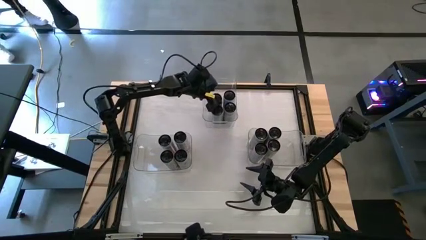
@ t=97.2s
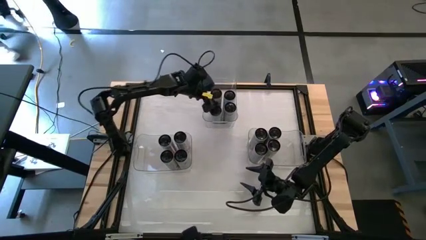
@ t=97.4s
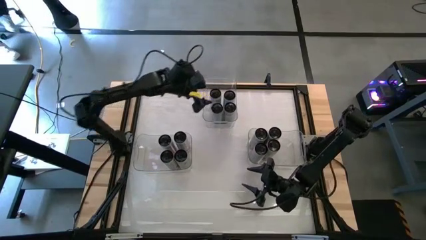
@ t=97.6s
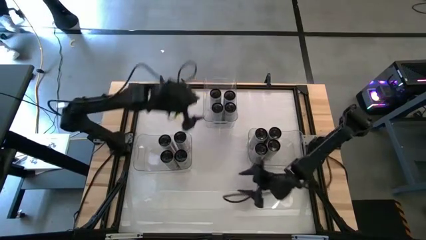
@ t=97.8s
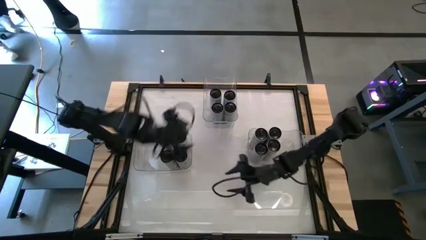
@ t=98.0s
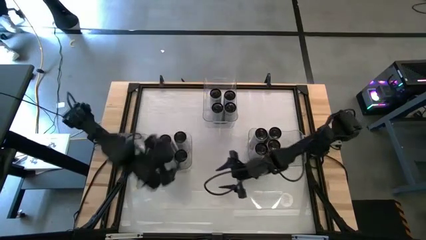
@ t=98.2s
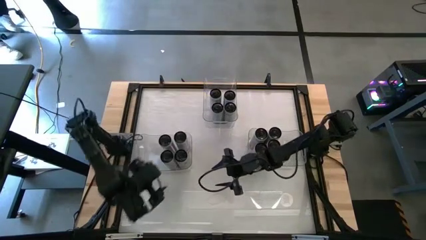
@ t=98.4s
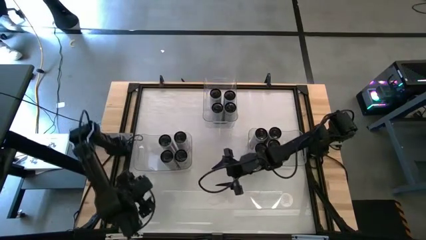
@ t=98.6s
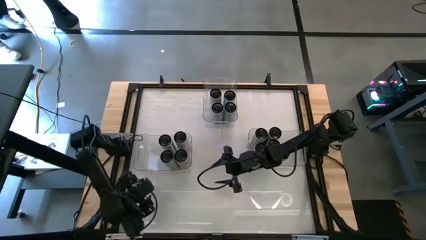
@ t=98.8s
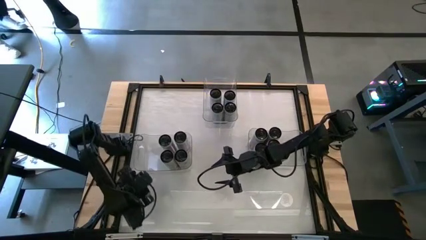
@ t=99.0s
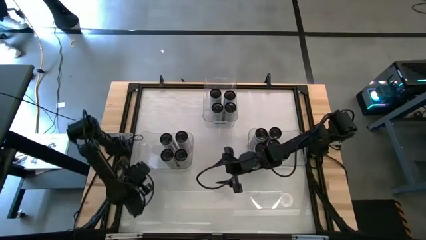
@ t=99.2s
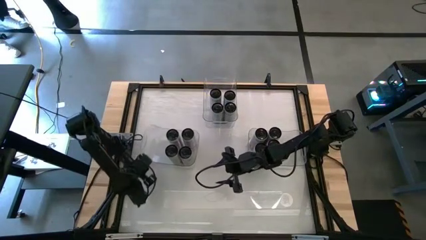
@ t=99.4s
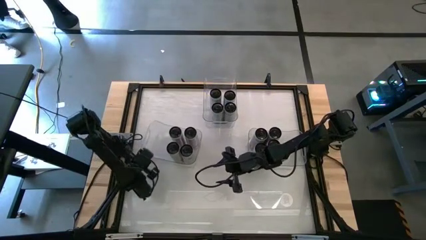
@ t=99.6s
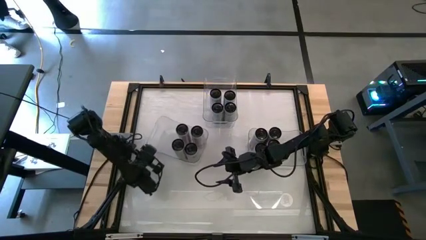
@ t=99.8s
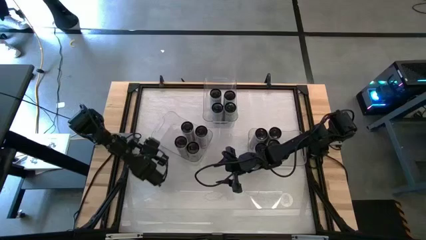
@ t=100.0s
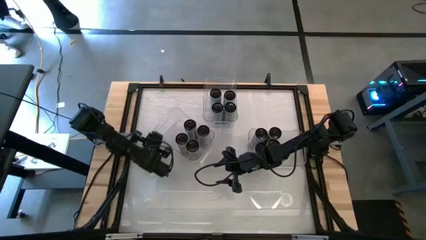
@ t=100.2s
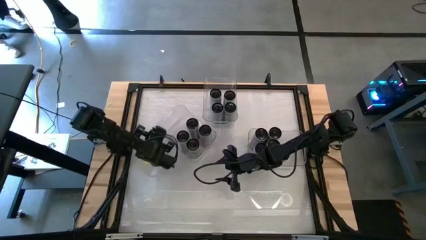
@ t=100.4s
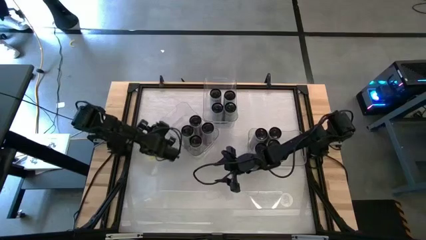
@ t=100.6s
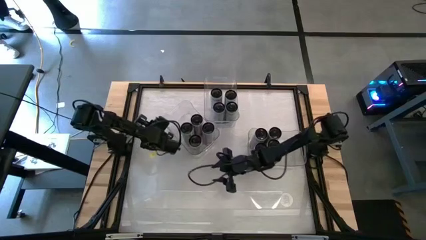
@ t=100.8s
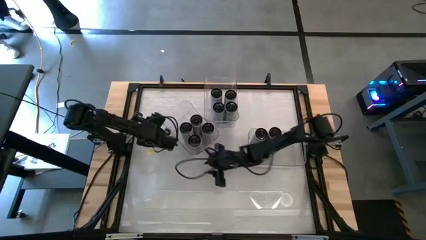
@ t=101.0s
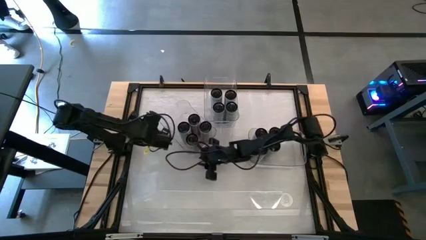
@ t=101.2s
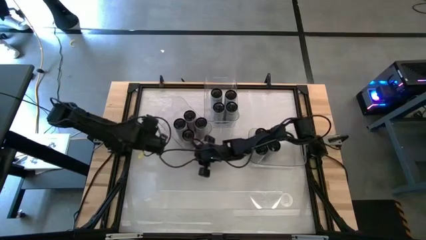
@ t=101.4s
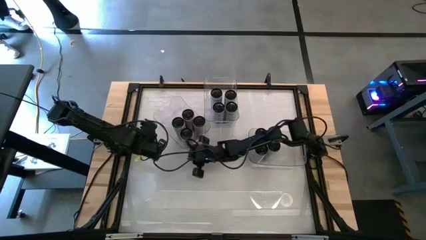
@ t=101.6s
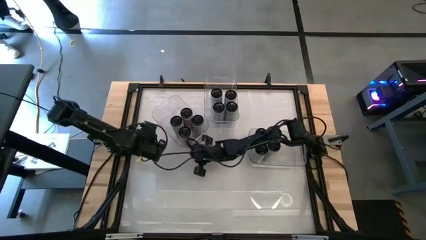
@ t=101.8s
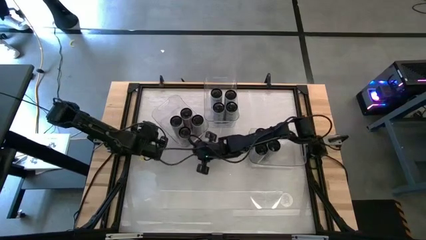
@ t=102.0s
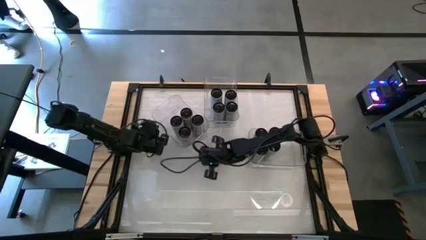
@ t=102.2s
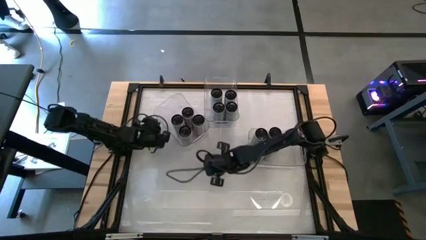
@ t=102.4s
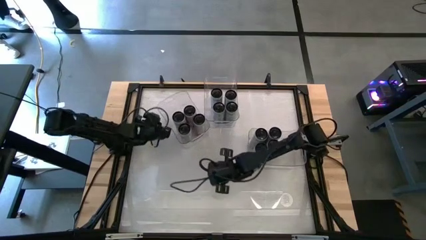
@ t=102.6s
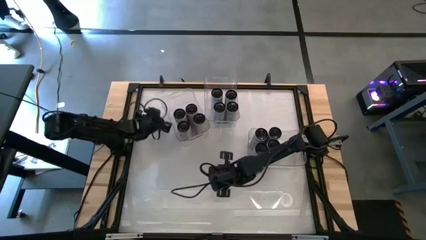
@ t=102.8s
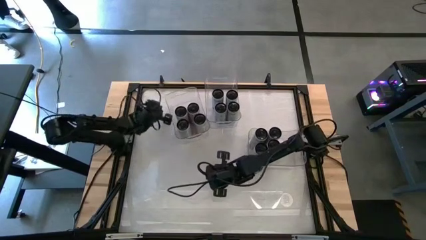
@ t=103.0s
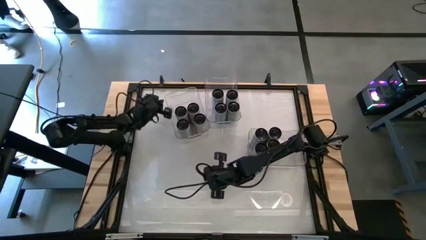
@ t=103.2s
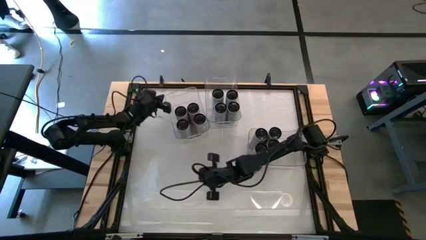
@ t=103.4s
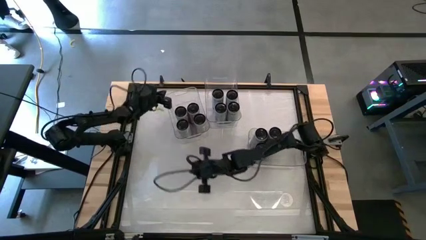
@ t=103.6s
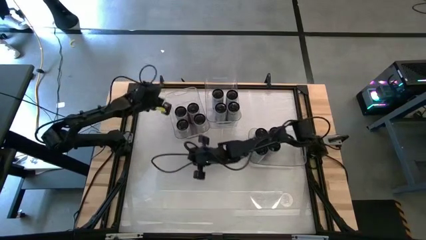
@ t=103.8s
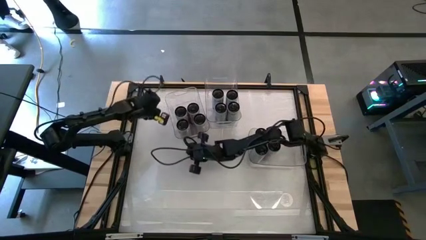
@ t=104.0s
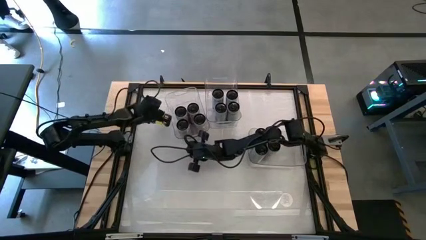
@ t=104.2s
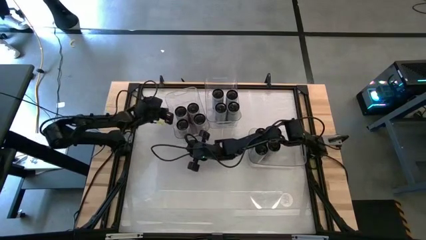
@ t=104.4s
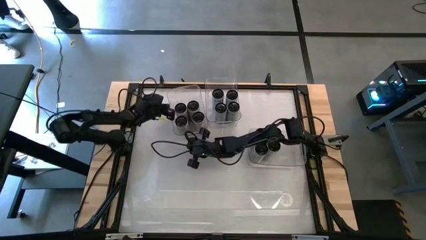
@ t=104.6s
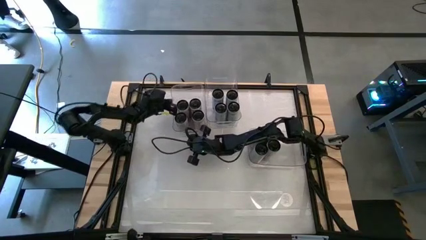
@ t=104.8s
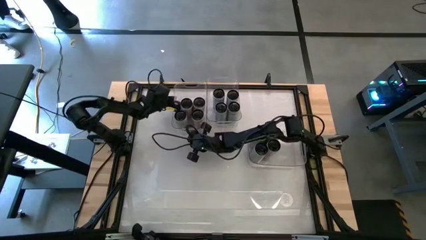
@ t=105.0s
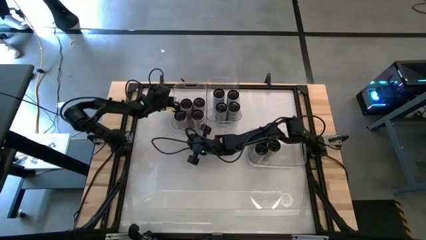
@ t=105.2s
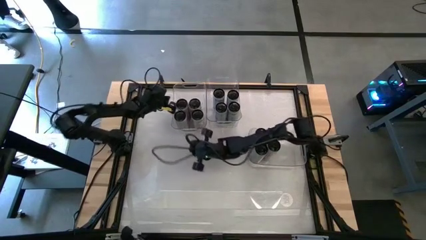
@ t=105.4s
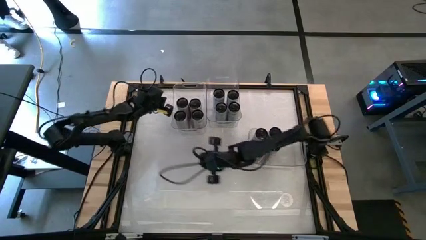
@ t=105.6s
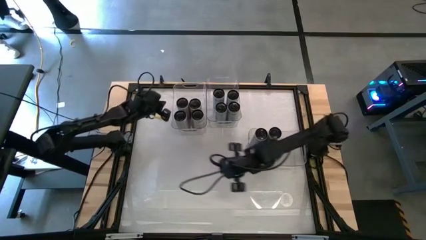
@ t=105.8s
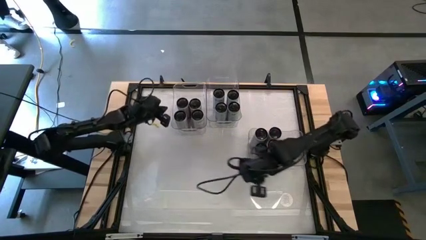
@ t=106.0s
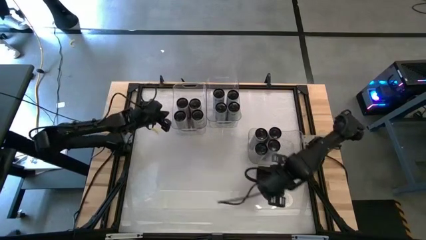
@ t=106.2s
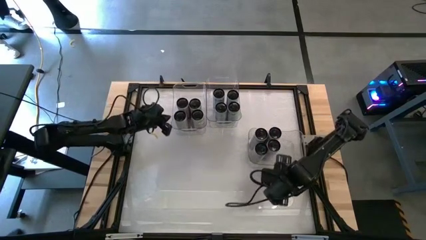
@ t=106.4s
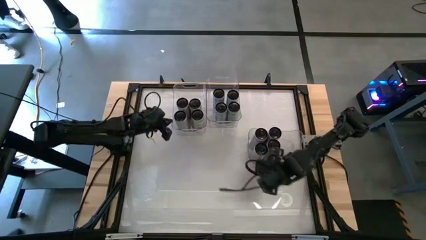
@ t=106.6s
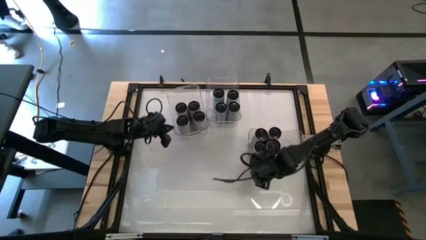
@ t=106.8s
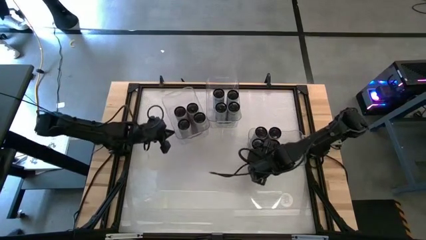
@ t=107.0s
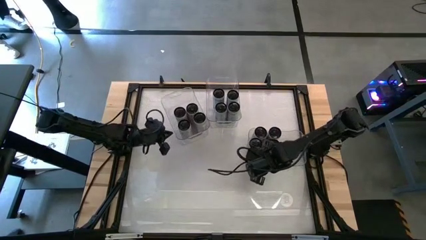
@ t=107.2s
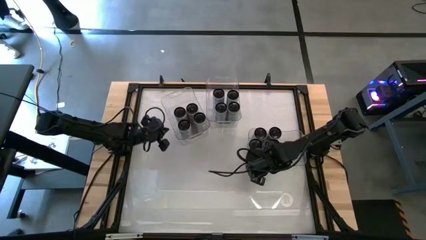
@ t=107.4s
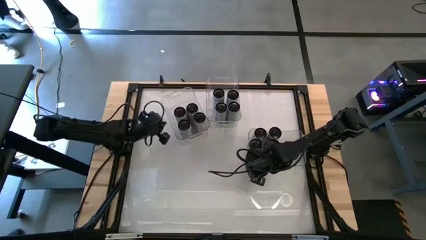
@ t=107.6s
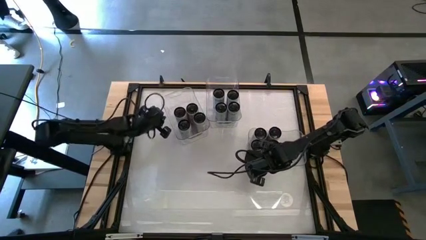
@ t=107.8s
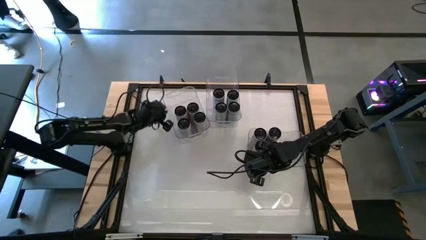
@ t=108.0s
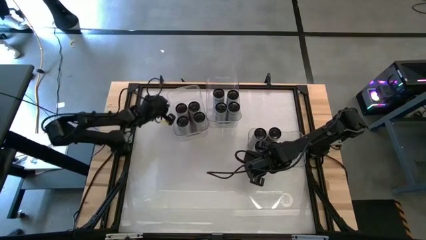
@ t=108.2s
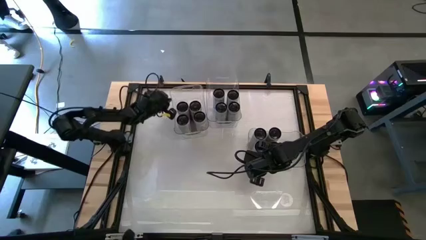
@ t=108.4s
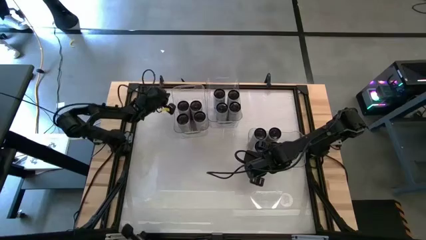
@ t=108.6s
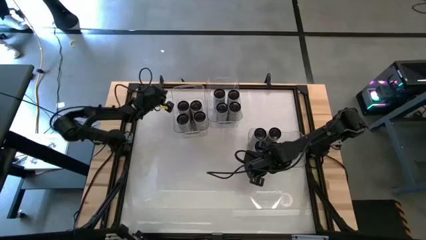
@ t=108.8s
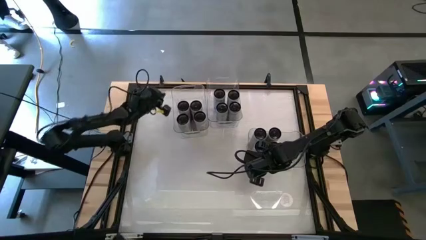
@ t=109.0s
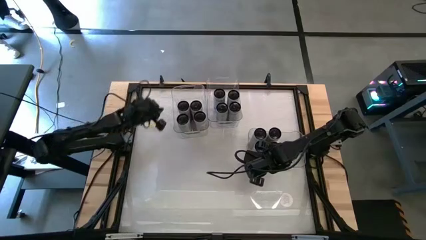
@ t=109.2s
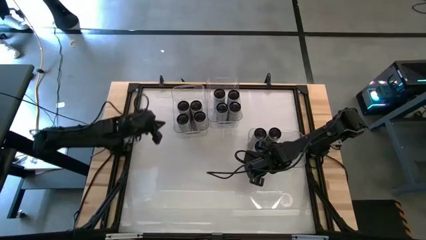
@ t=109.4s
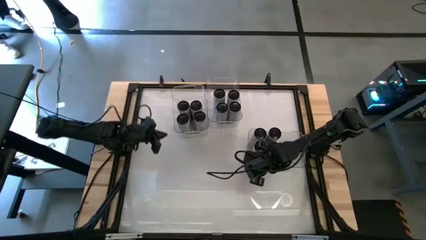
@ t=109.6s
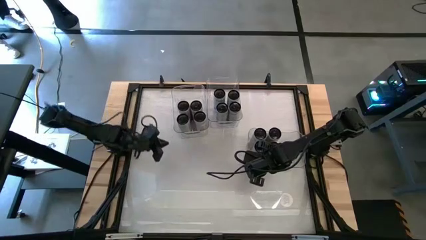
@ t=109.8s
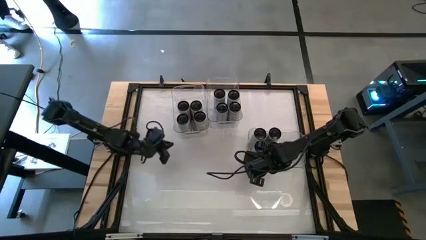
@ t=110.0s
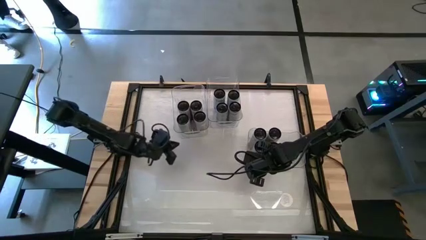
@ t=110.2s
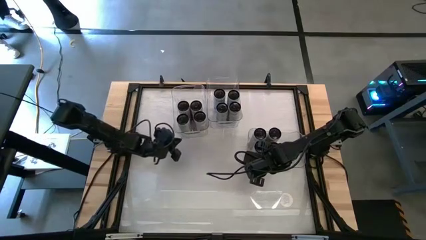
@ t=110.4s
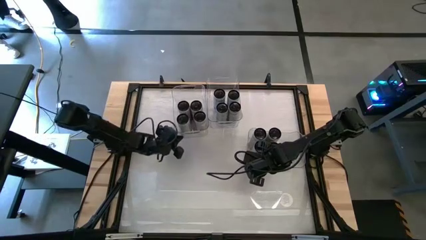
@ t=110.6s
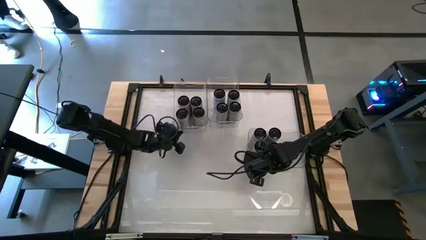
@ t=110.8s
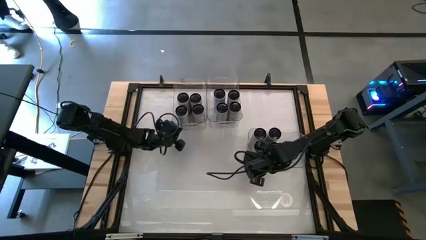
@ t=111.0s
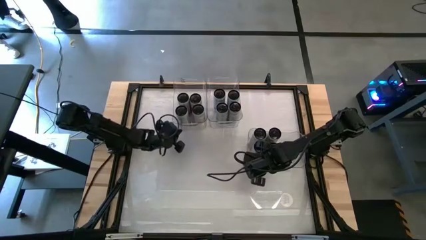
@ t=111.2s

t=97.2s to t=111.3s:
Task: Sort soda cans
Move the bottom left transparent bin to the top left of the table
